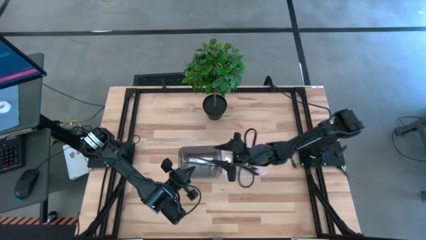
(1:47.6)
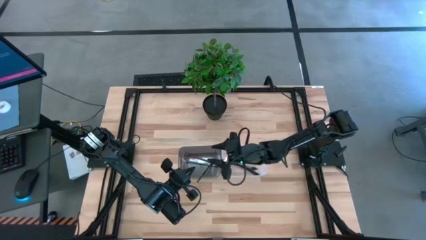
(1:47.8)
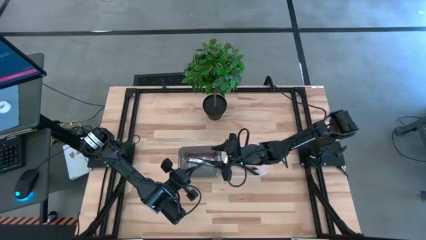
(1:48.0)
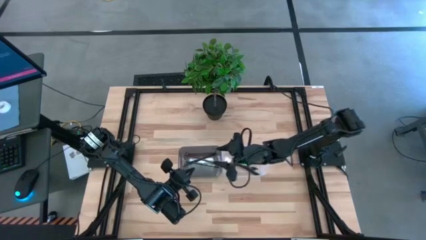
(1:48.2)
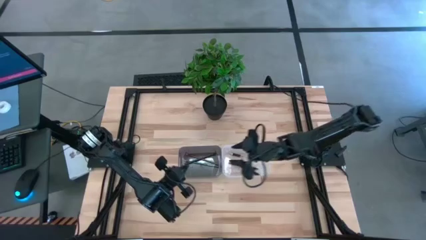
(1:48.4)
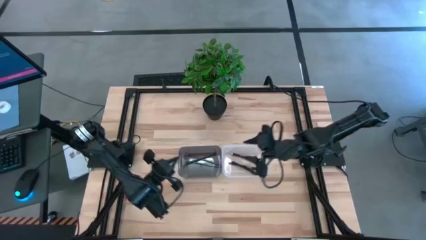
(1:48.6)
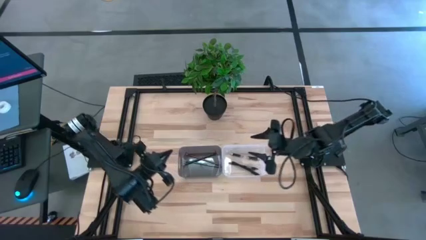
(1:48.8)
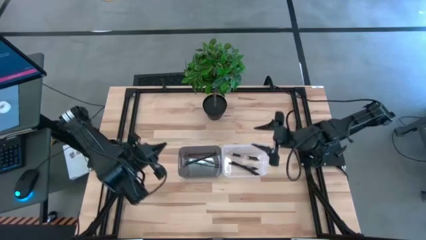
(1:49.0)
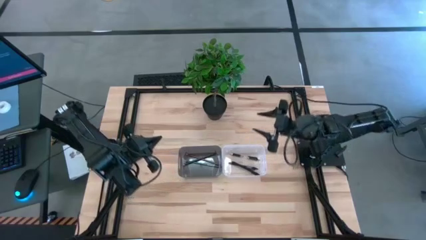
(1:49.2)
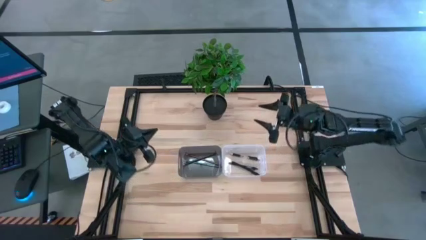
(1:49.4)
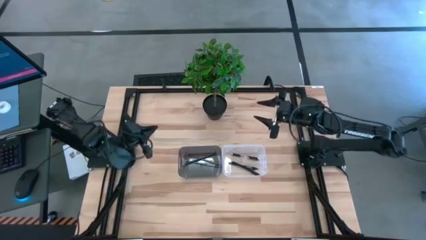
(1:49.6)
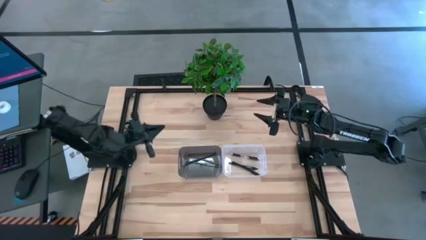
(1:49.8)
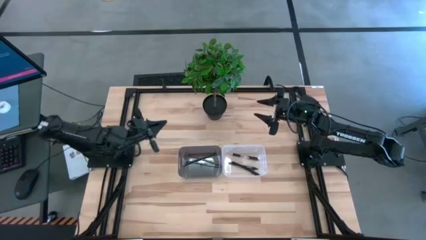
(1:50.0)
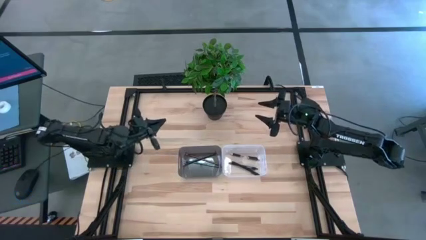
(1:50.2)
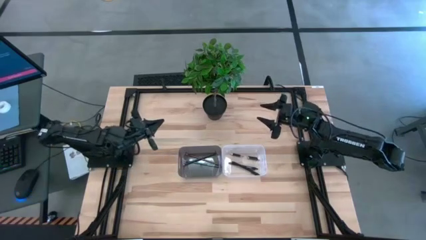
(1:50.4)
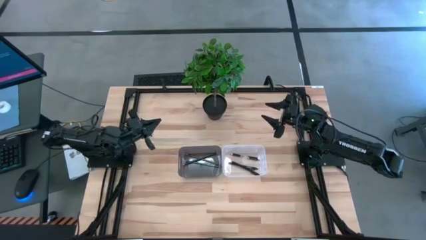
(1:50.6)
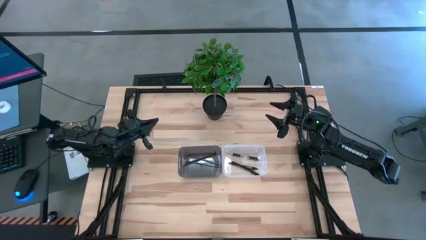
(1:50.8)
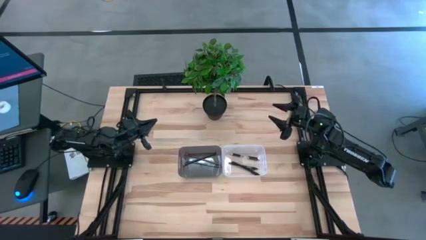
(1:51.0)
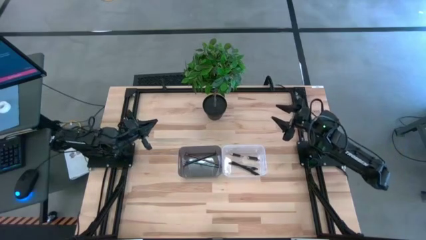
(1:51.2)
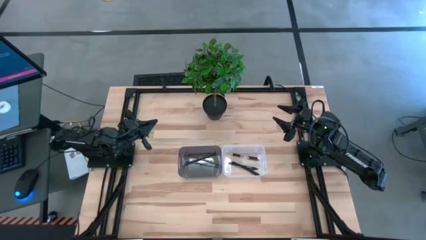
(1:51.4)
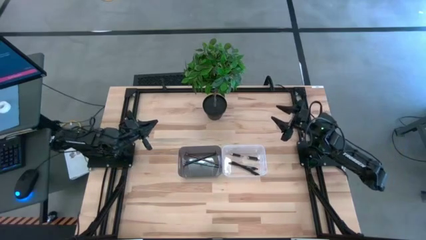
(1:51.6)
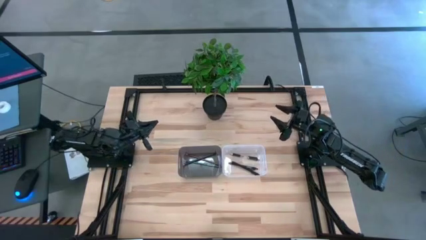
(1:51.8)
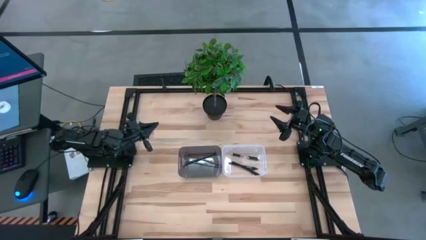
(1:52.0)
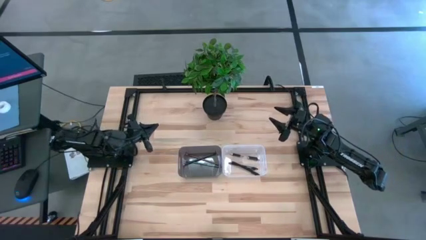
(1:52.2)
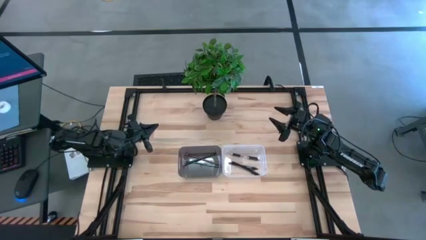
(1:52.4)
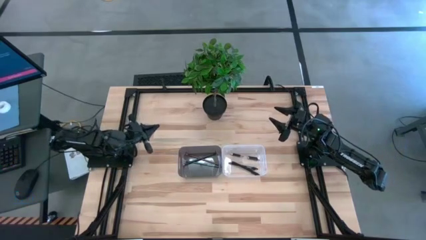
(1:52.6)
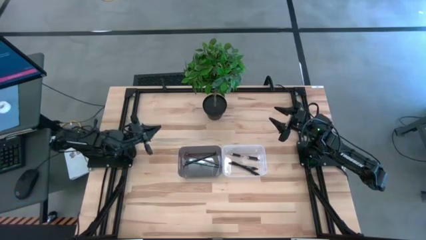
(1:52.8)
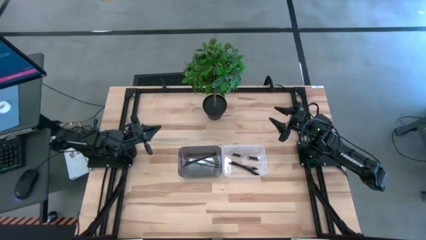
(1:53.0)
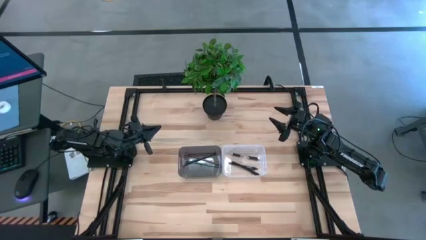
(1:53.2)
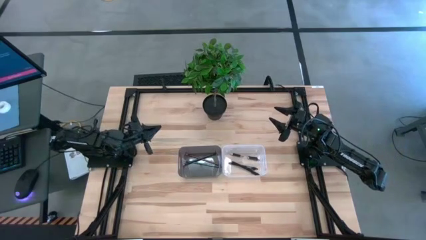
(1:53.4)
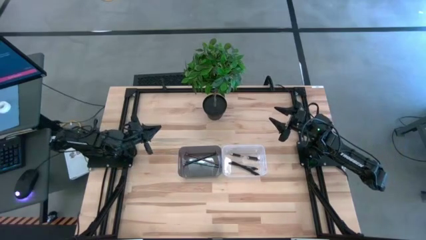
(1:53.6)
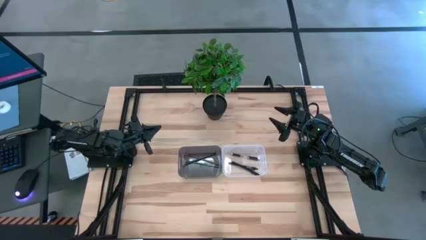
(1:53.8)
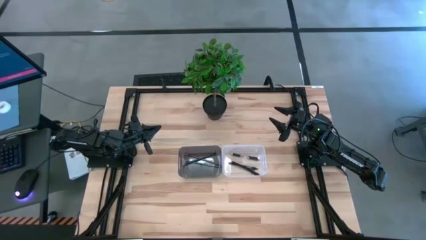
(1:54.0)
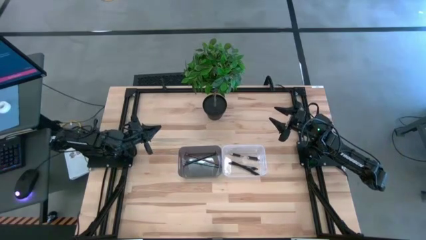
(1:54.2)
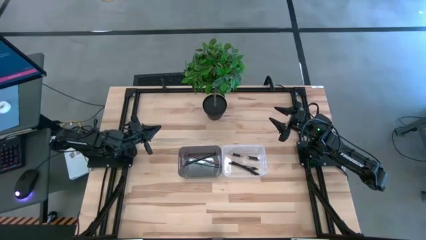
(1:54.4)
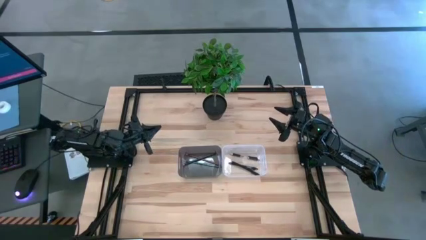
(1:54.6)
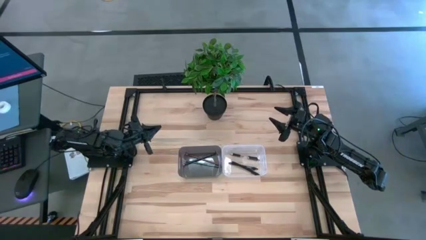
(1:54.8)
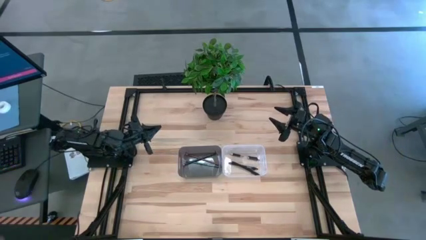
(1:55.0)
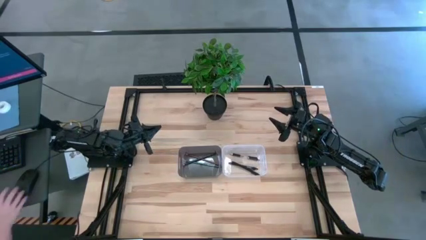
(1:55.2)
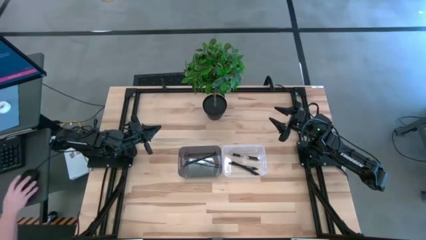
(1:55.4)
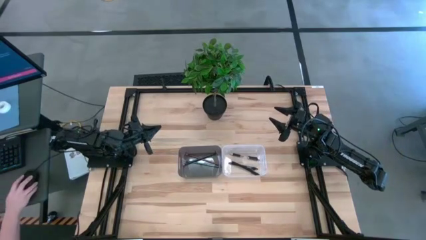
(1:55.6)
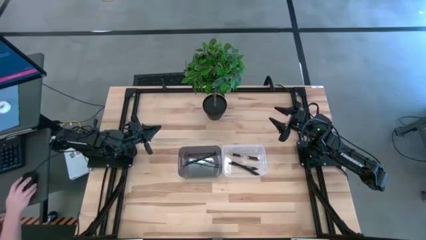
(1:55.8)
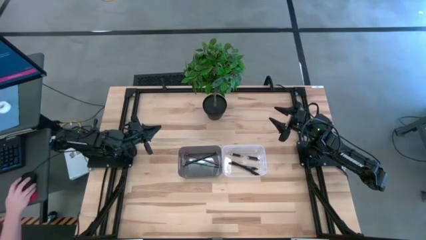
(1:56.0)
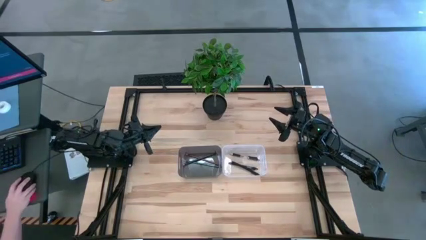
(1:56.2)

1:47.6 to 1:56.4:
Task: Sort pens & pencils
Return to Home Position

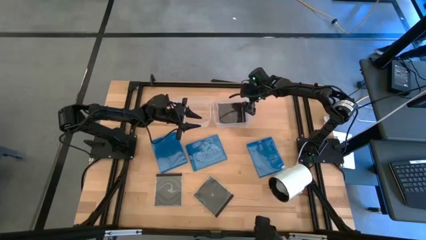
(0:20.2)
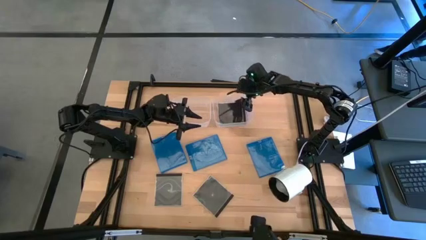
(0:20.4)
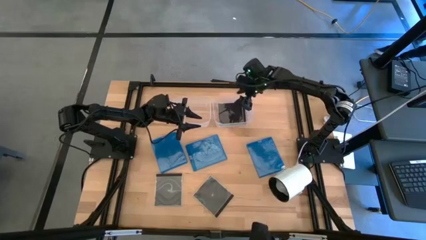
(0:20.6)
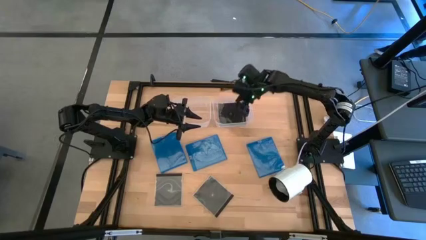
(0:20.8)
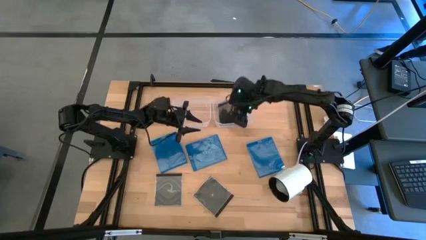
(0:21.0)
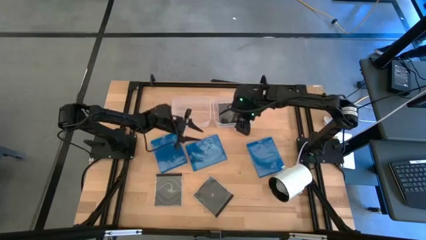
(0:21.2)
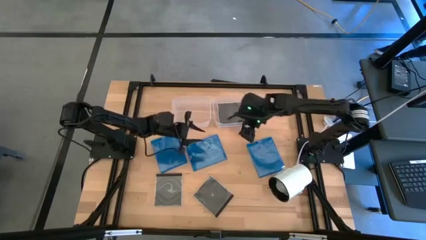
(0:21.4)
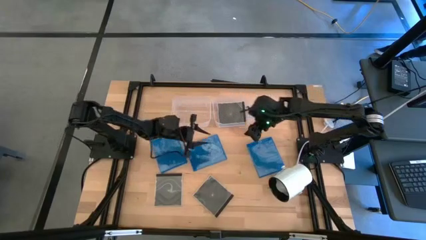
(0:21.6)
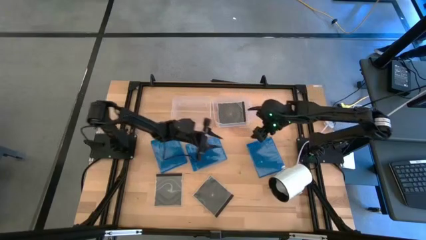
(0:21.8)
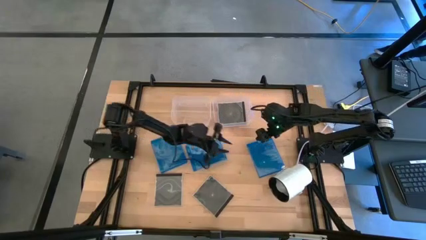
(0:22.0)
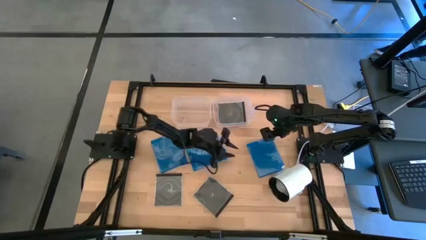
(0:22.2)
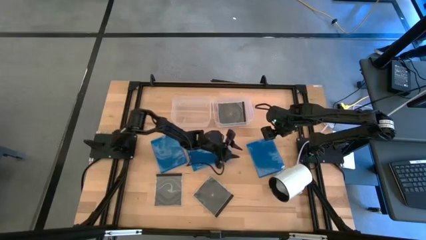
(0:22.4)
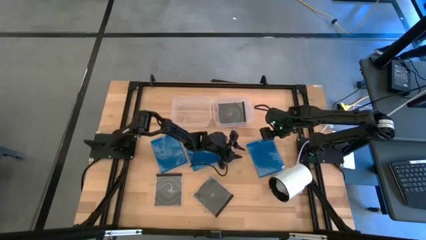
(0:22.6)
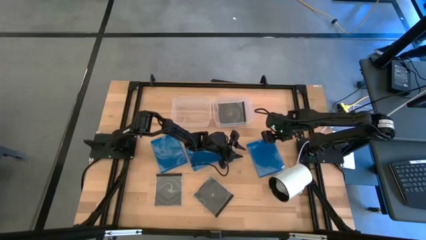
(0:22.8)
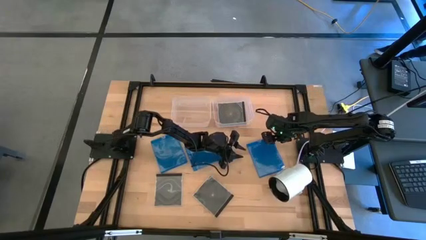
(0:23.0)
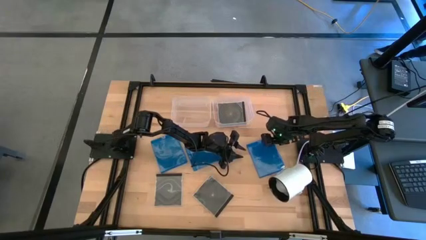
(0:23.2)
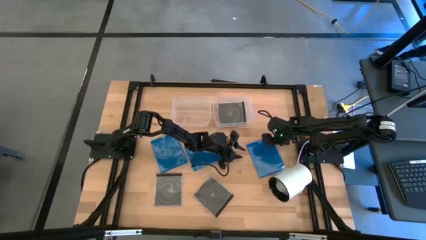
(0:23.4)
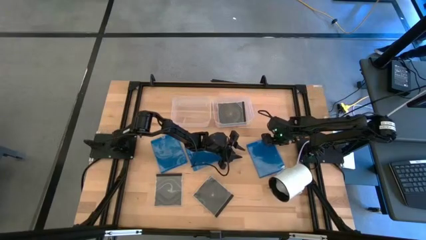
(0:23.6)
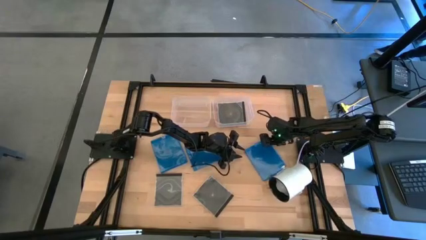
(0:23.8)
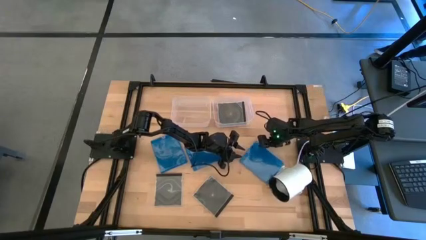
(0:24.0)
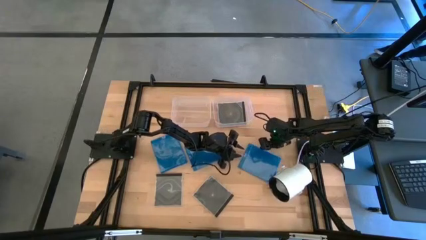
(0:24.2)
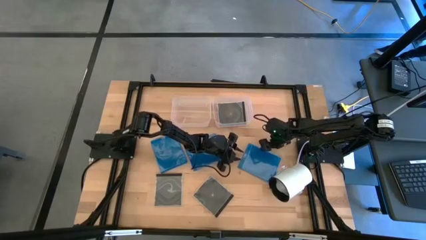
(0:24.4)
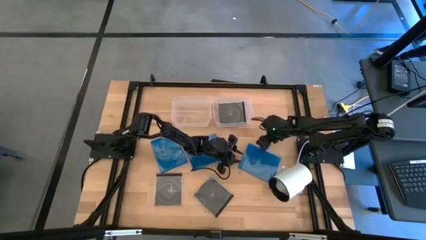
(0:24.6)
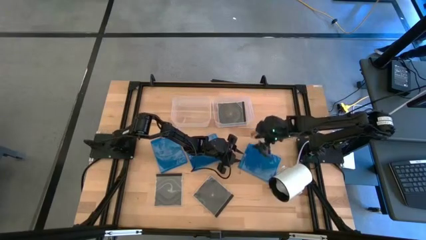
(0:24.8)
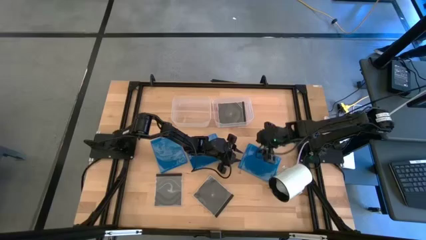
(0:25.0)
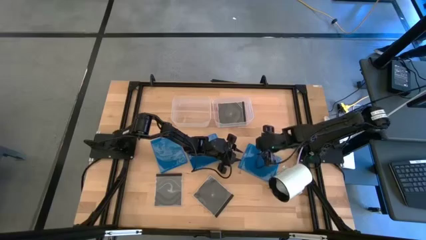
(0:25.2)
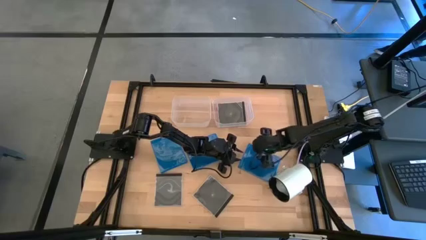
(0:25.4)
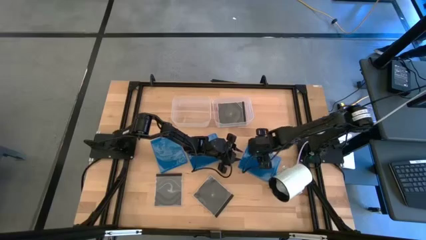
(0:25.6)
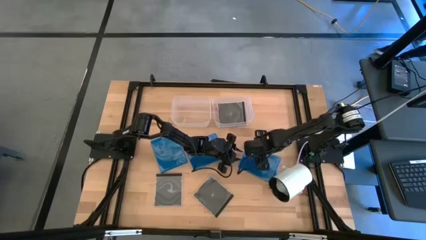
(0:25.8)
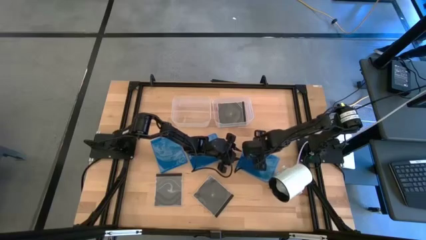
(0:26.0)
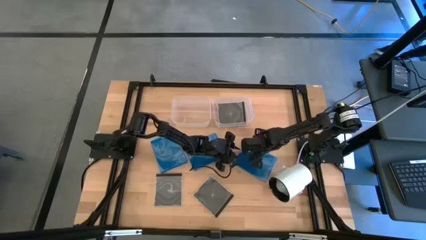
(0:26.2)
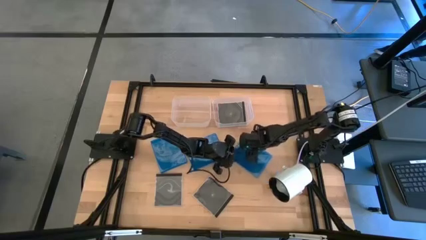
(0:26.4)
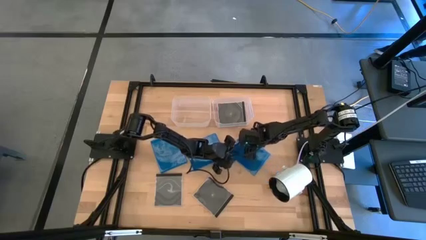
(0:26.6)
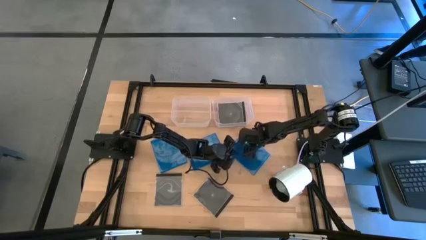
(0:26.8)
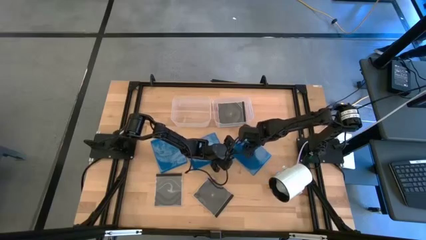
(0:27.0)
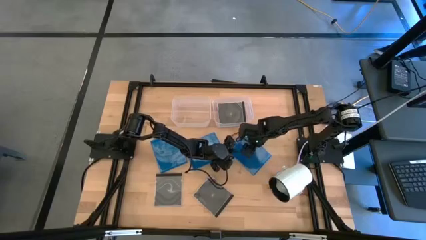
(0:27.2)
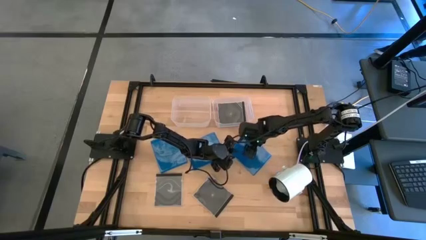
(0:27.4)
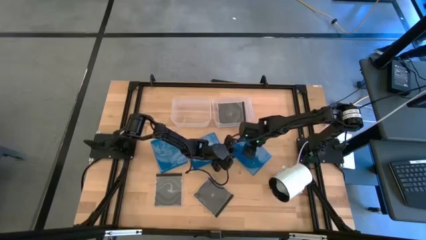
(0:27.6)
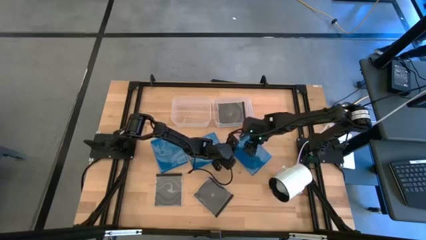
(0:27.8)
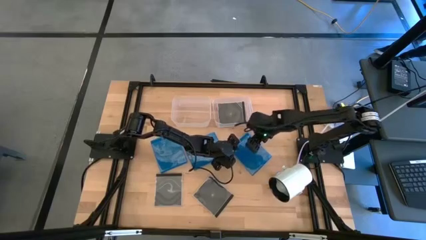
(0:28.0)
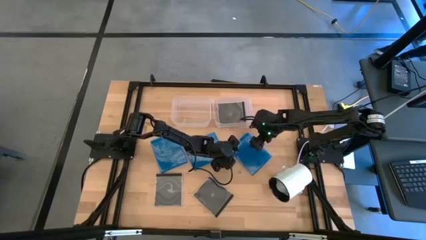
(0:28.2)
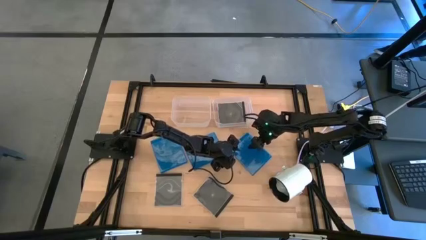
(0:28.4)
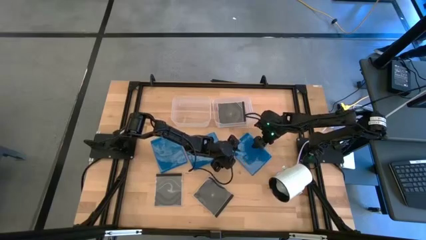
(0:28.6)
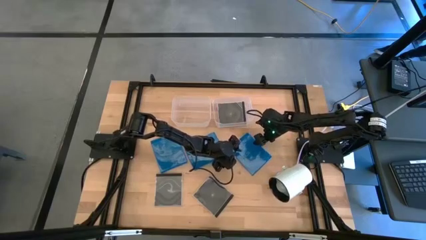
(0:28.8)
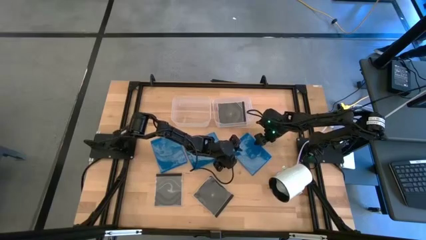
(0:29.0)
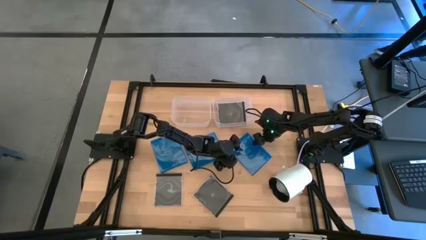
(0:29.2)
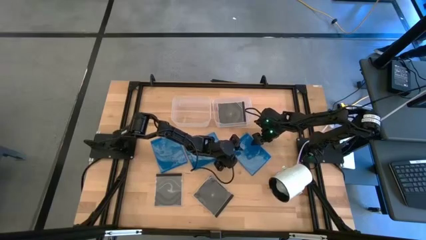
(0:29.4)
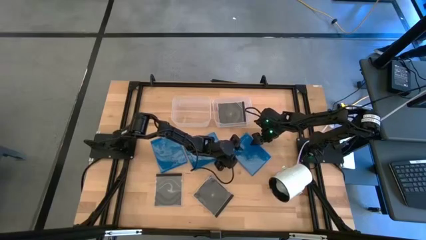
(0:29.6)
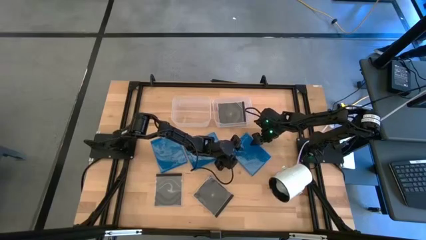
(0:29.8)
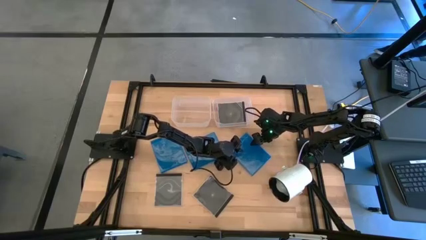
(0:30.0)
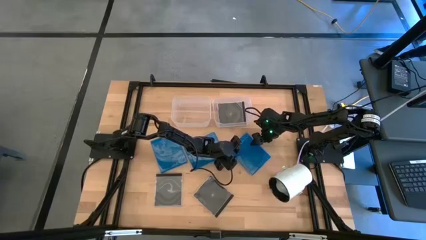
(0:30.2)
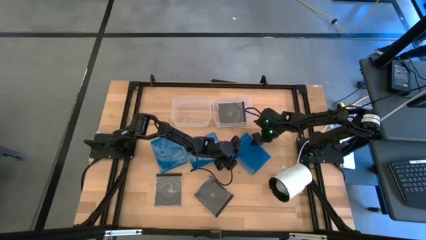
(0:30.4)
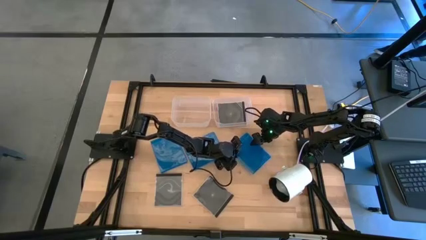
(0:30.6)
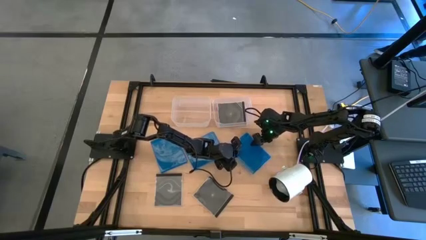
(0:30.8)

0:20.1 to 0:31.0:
Task: Pick & place jewel cases by type
Put the right blue CD case into the left transparent bin
